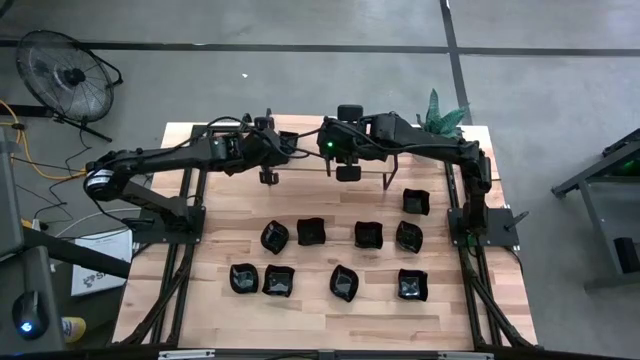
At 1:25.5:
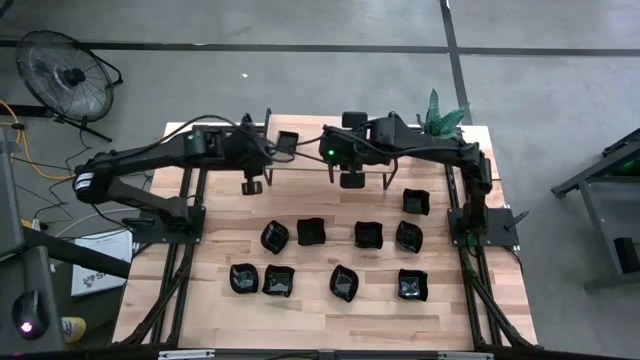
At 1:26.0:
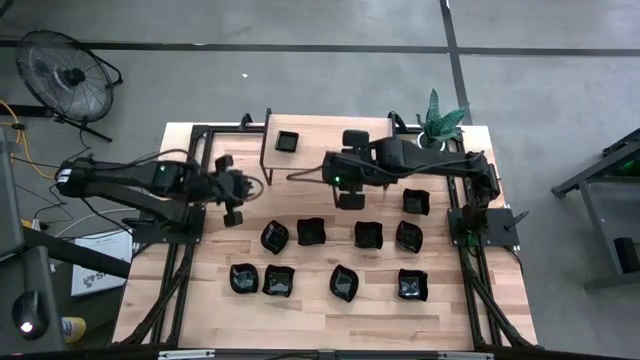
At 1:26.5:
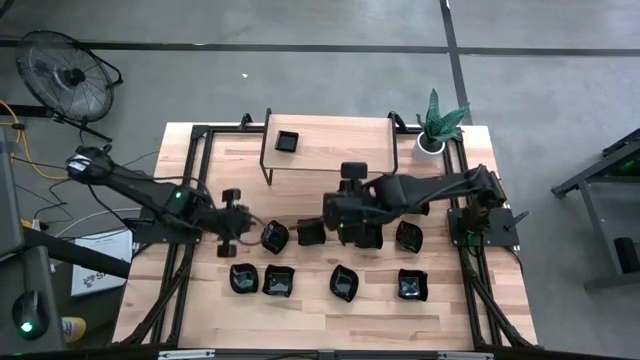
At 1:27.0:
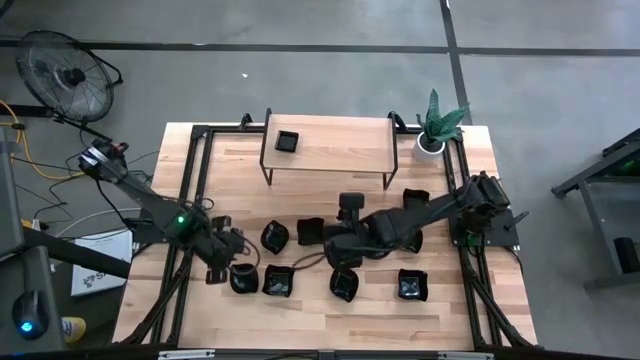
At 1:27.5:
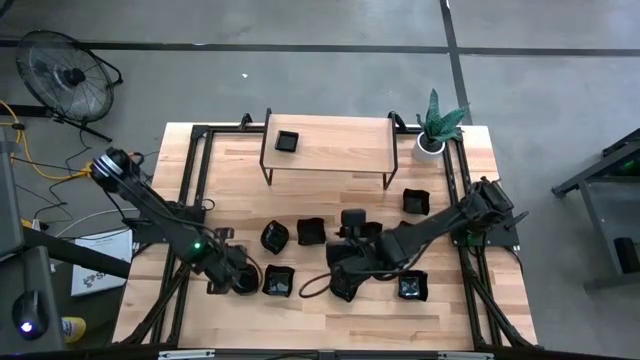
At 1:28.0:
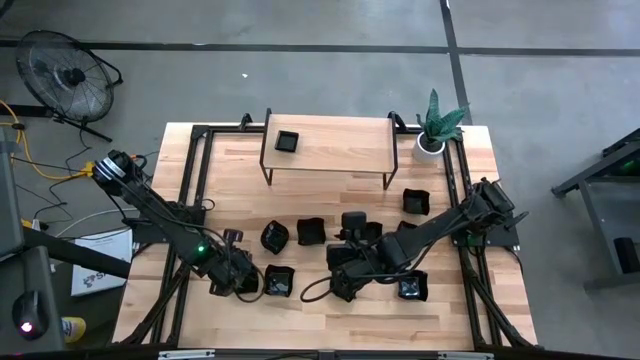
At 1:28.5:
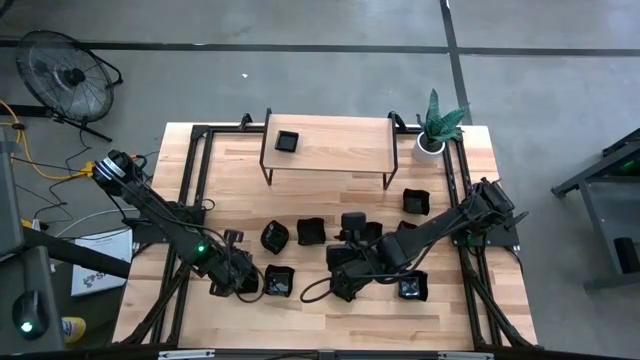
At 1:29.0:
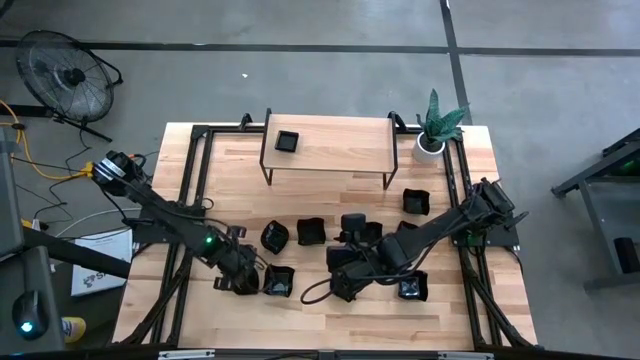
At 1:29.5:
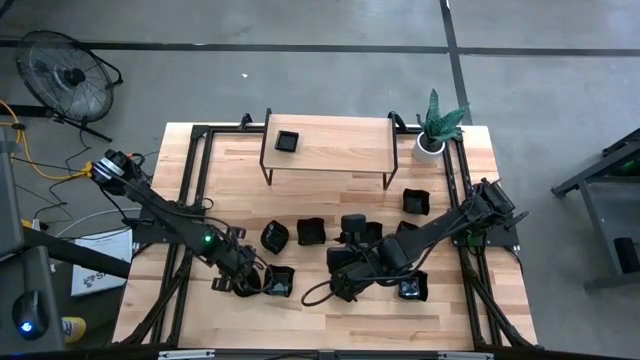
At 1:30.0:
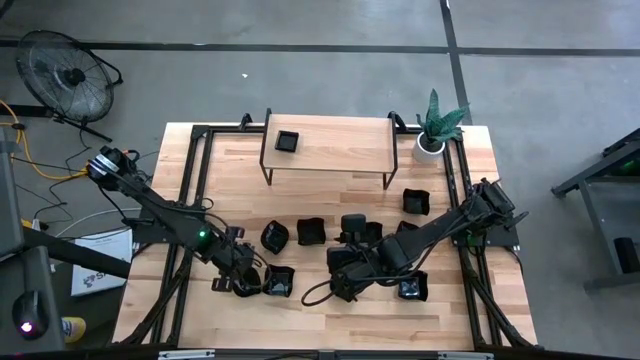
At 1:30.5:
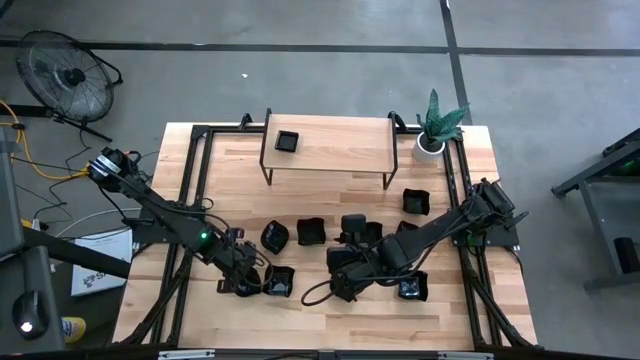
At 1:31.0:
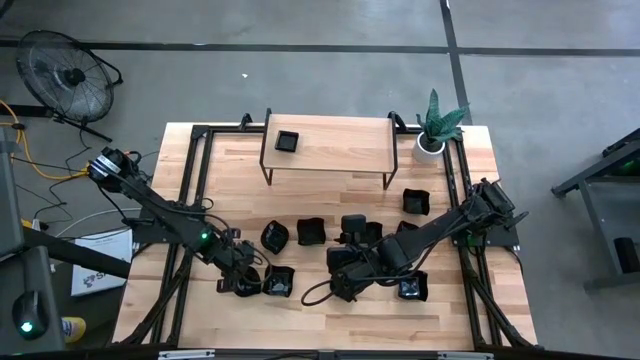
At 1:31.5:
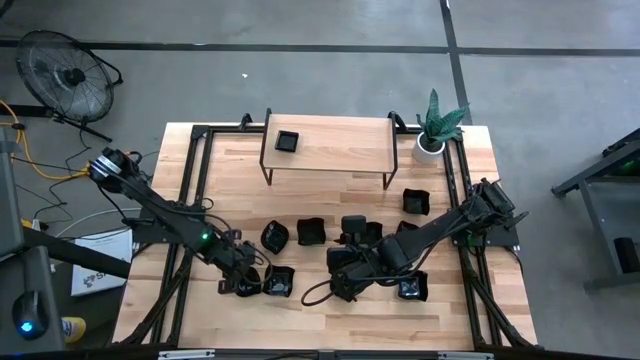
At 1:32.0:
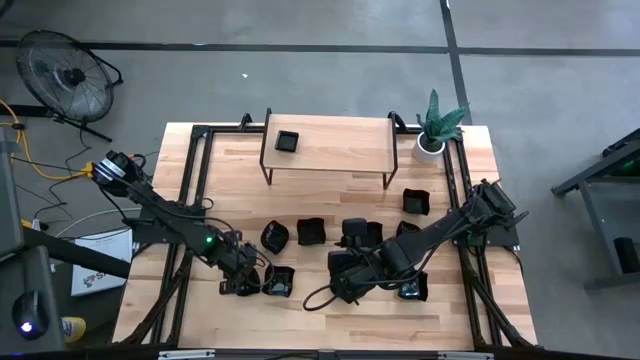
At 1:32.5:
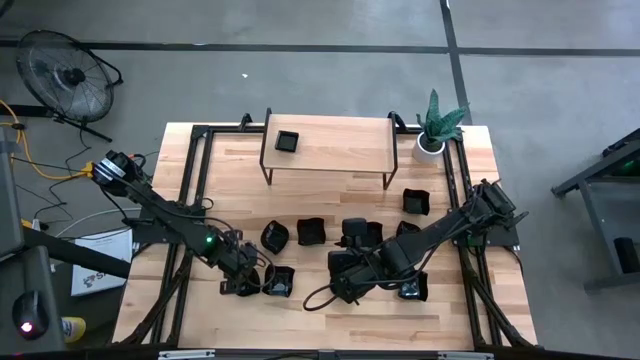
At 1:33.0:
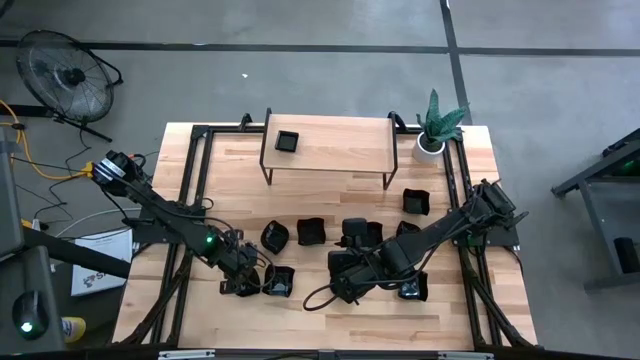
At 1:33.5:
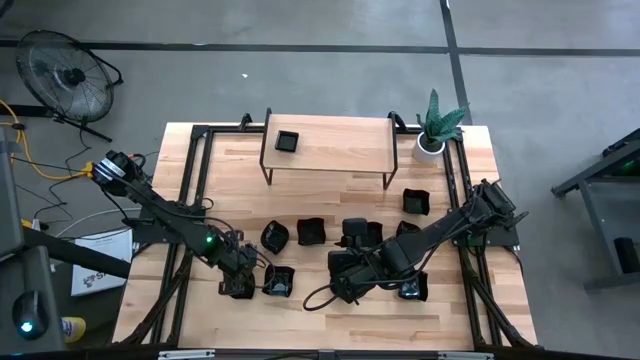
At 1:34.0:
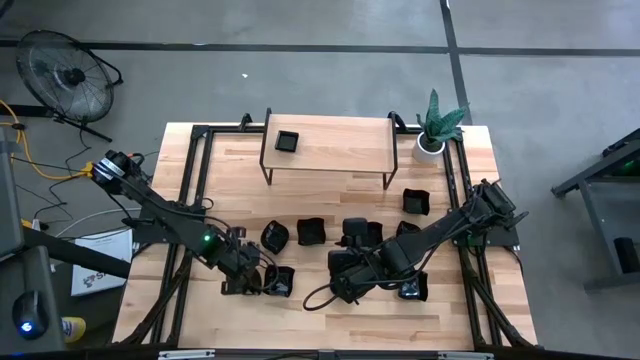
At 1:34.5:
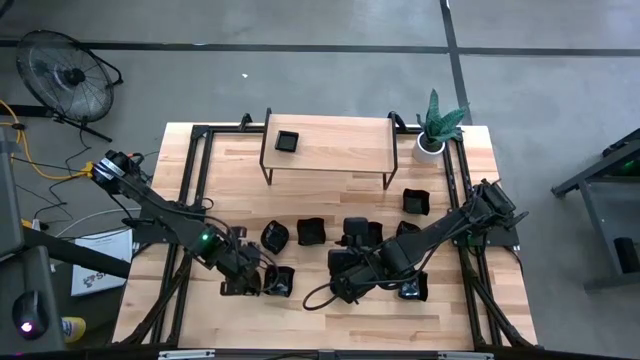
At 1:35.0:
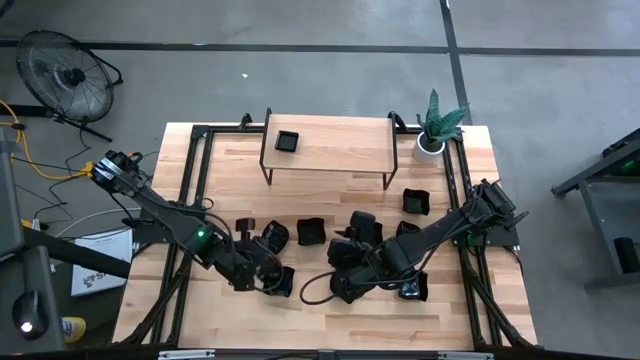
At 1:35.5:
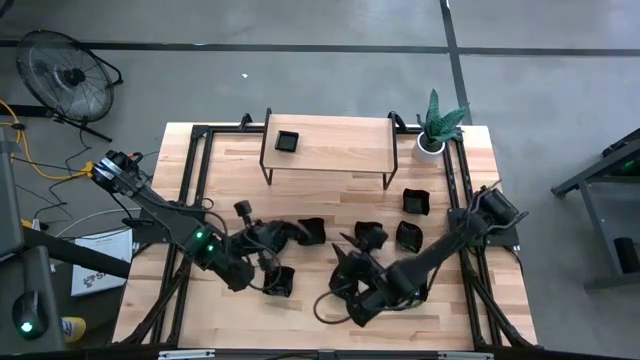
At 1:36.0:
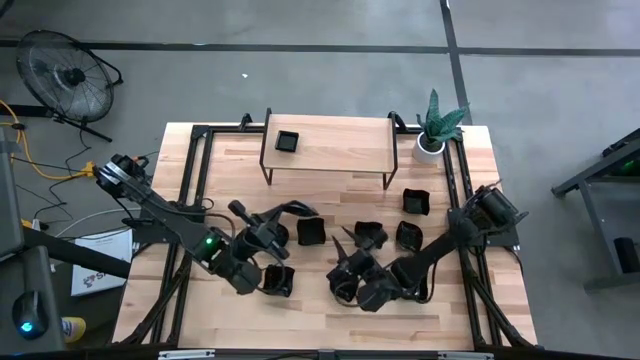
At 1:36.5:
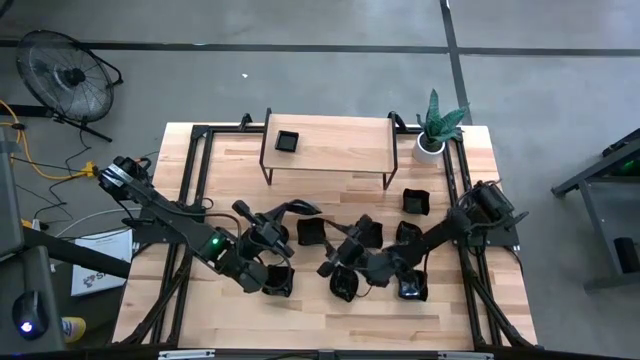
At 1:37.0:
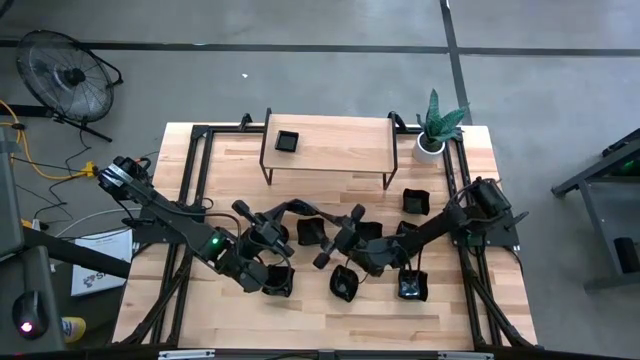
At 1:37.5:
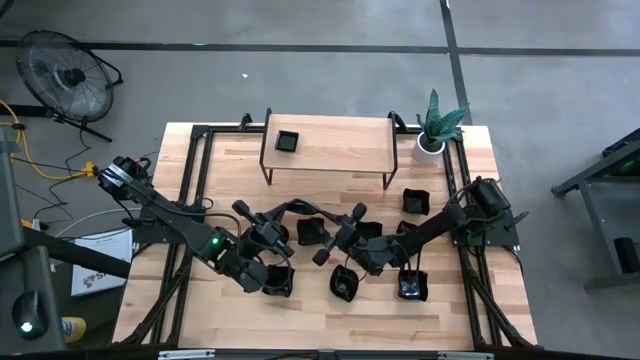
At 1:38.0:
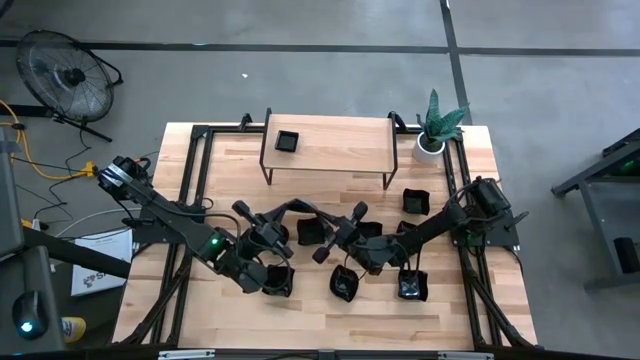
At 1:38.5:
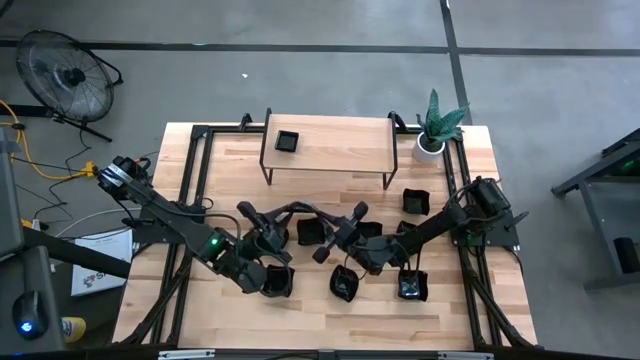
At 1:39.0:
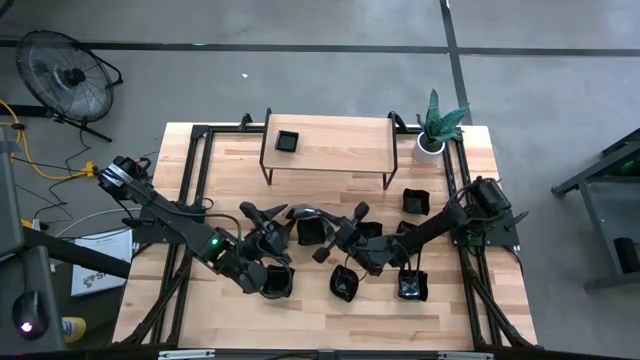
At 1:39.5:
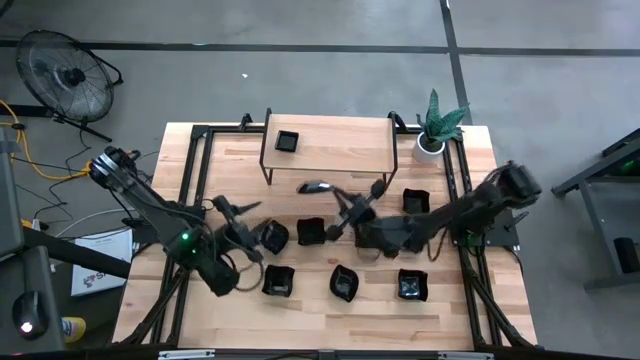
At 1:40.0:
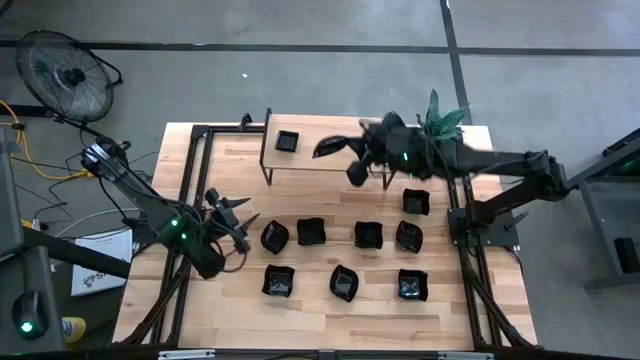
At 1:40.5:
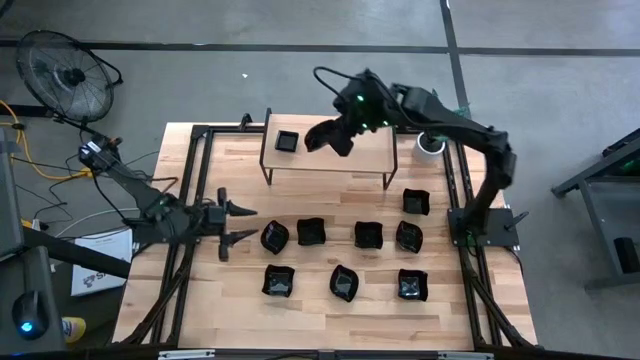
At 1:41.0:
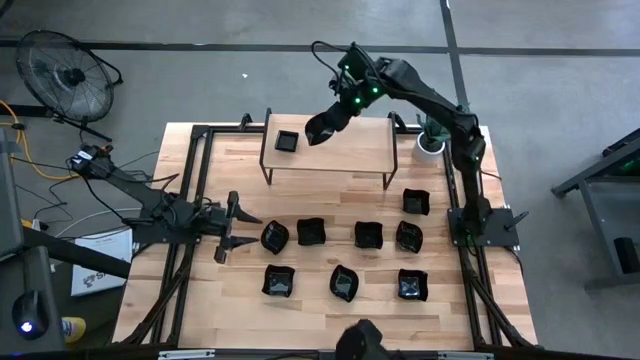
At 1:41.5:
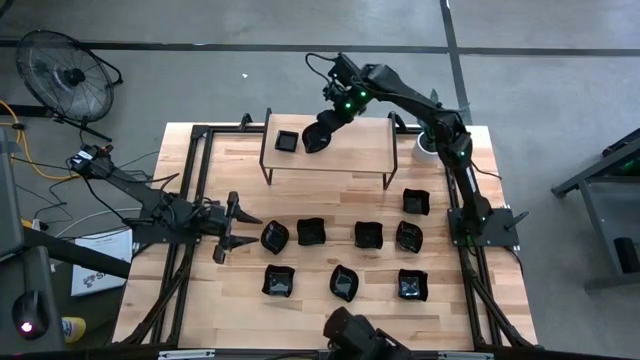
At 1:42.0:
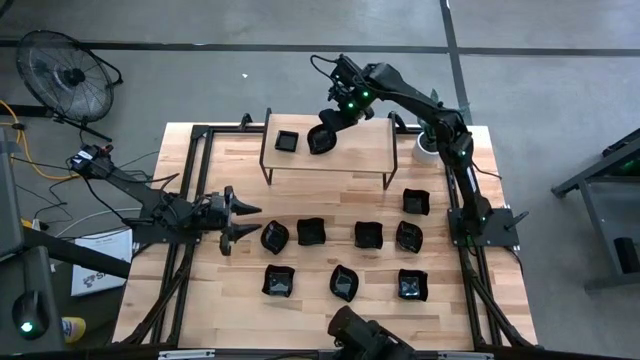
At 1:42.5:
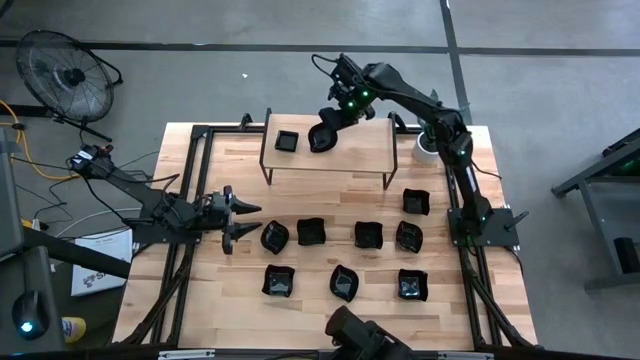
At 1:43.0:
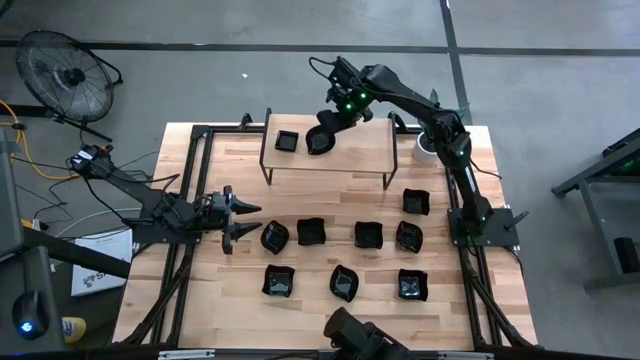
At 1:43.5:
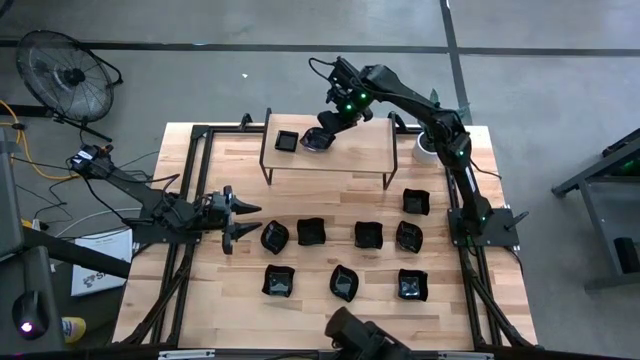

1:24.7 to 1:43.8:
Task: Pick & Place Mini shaped plates
Put the black leaf-shaped plate on the shelf
